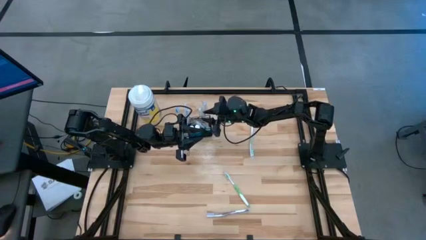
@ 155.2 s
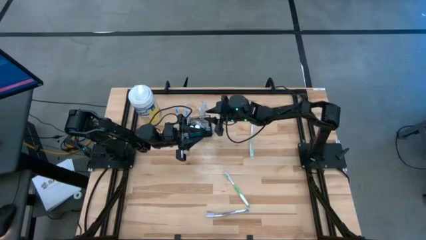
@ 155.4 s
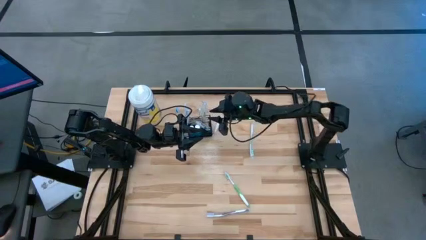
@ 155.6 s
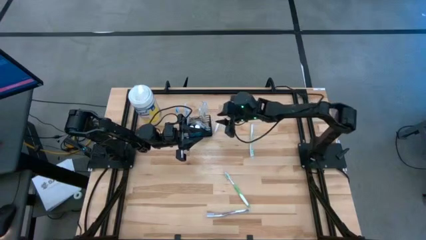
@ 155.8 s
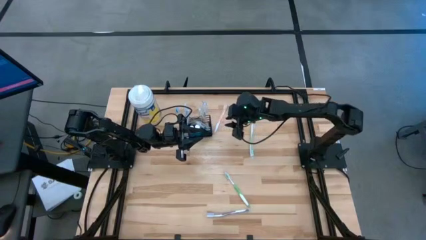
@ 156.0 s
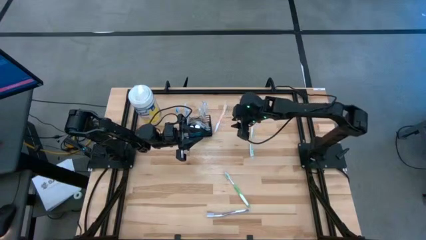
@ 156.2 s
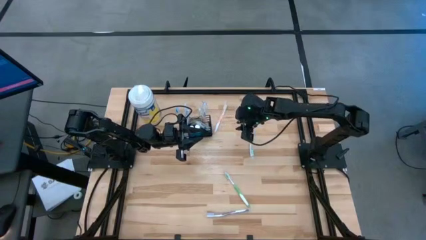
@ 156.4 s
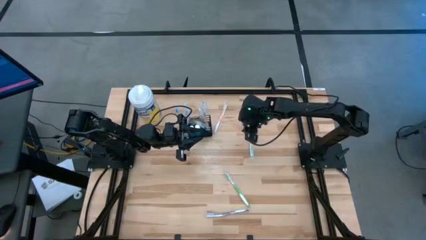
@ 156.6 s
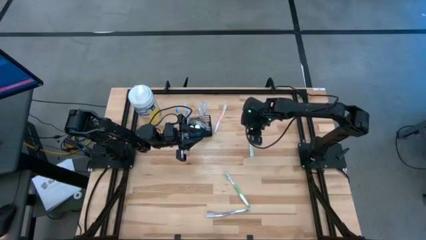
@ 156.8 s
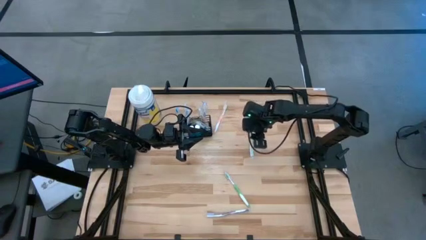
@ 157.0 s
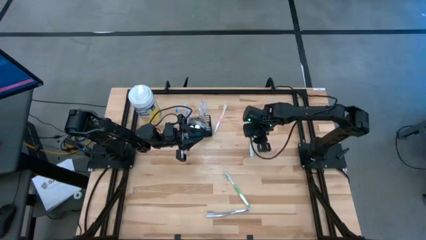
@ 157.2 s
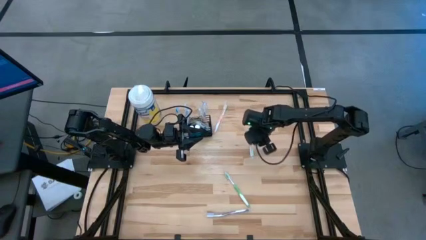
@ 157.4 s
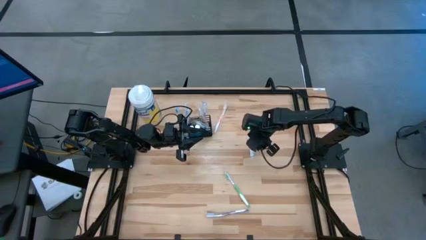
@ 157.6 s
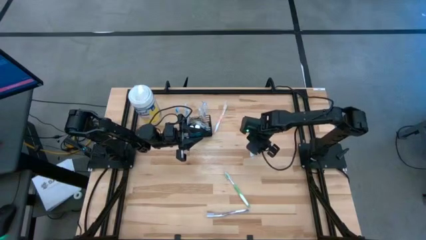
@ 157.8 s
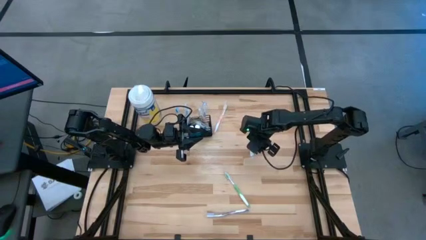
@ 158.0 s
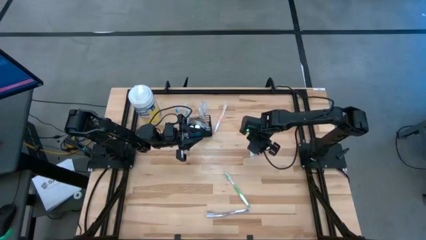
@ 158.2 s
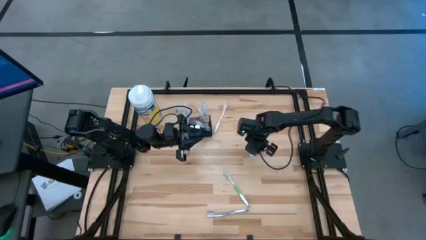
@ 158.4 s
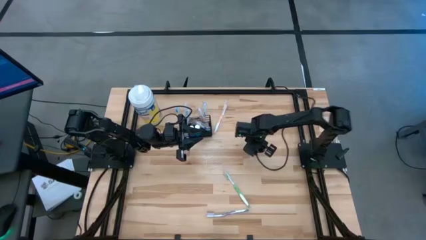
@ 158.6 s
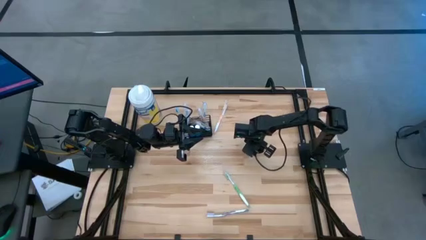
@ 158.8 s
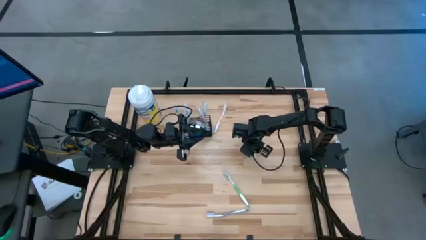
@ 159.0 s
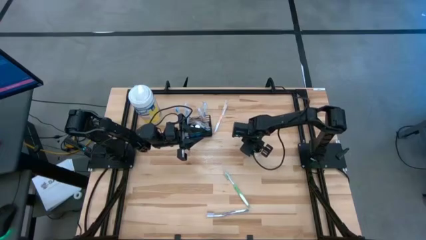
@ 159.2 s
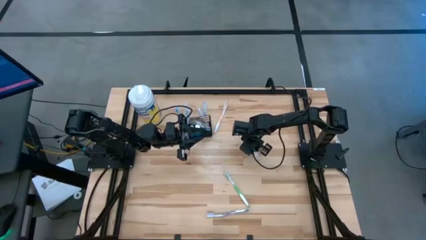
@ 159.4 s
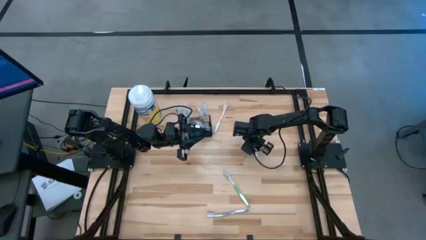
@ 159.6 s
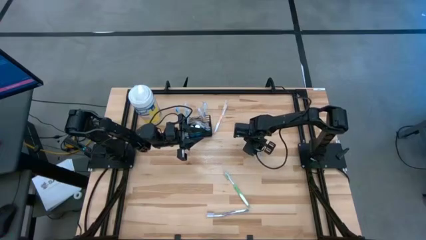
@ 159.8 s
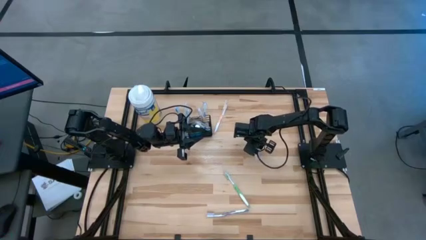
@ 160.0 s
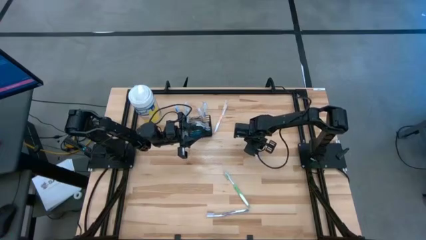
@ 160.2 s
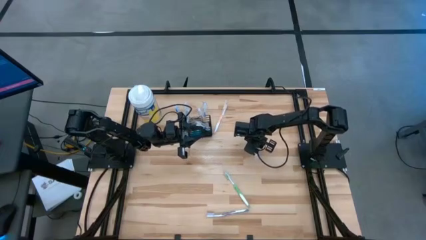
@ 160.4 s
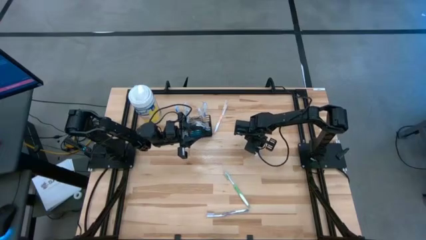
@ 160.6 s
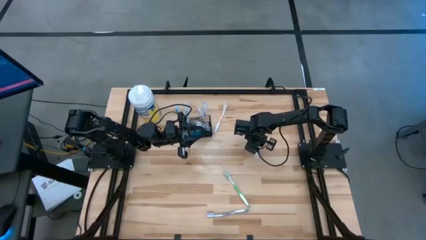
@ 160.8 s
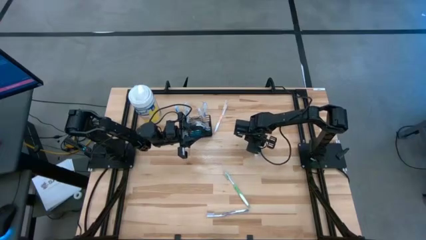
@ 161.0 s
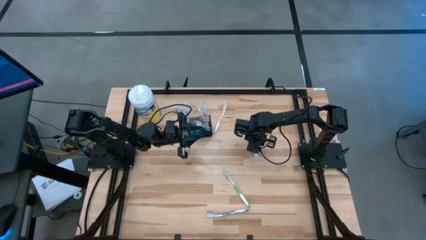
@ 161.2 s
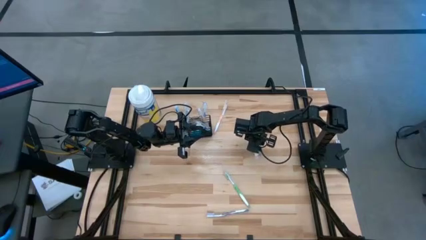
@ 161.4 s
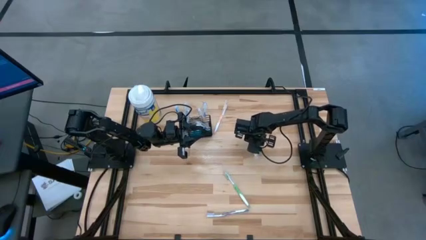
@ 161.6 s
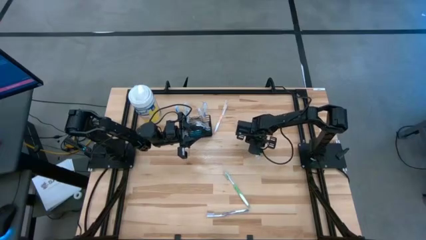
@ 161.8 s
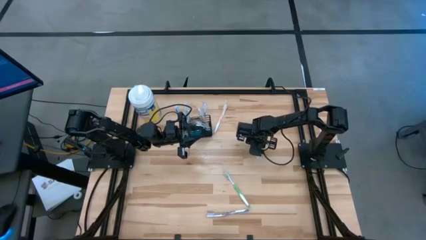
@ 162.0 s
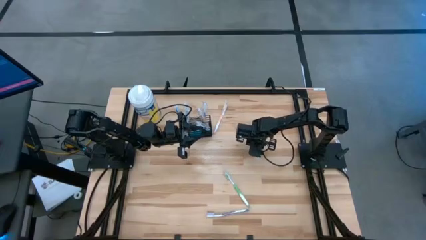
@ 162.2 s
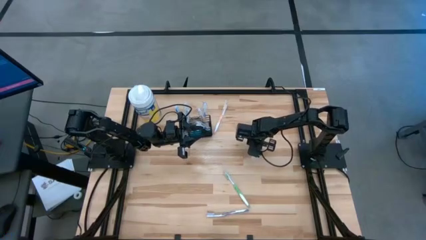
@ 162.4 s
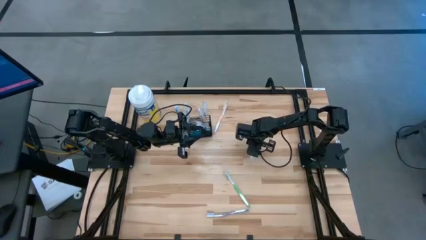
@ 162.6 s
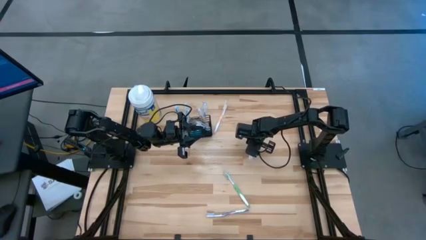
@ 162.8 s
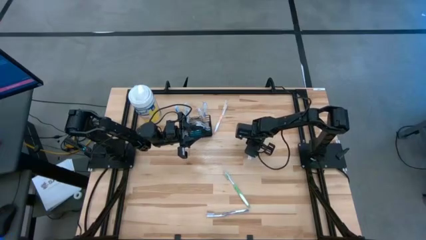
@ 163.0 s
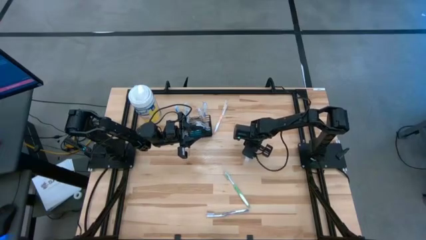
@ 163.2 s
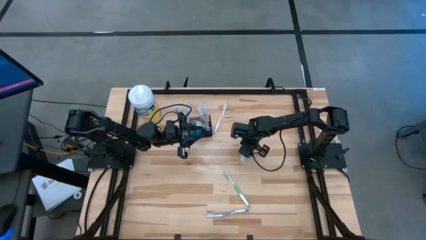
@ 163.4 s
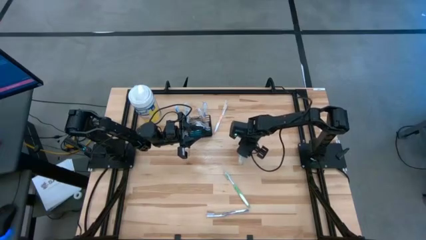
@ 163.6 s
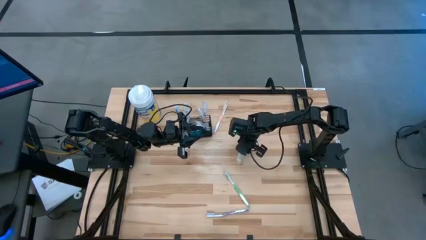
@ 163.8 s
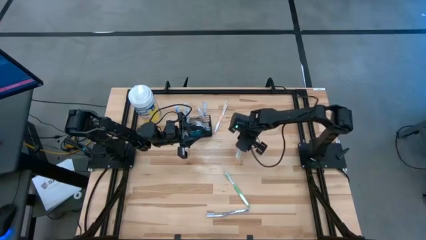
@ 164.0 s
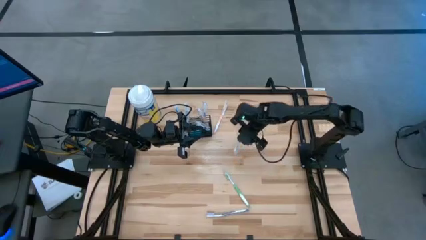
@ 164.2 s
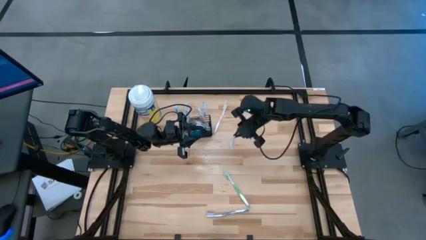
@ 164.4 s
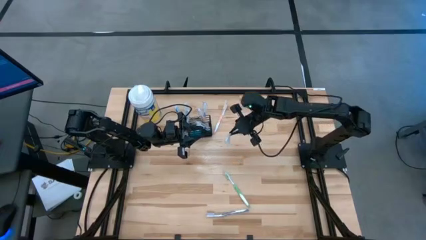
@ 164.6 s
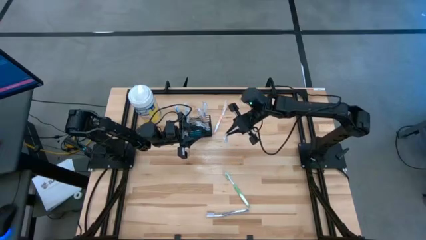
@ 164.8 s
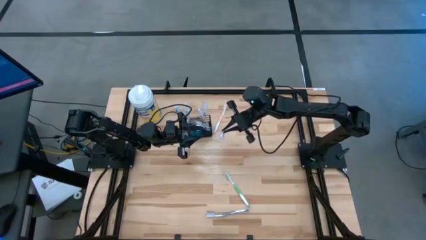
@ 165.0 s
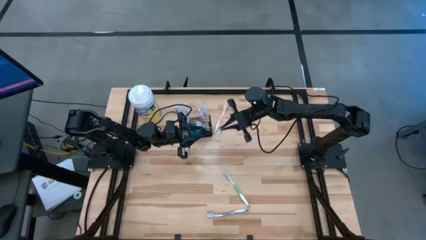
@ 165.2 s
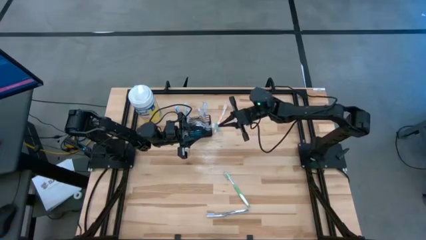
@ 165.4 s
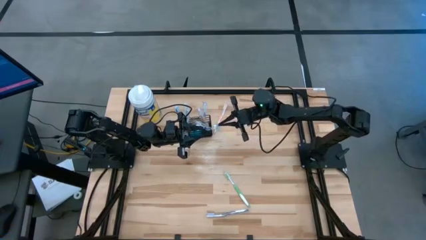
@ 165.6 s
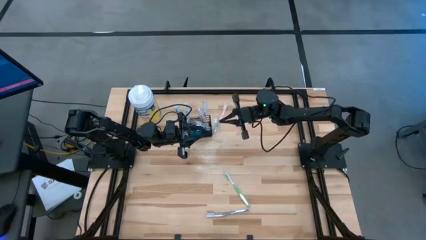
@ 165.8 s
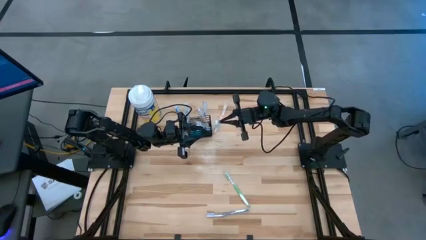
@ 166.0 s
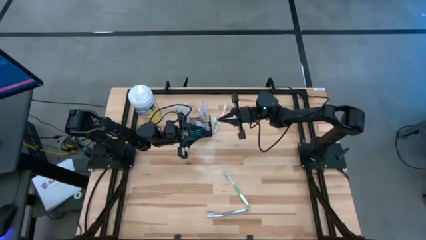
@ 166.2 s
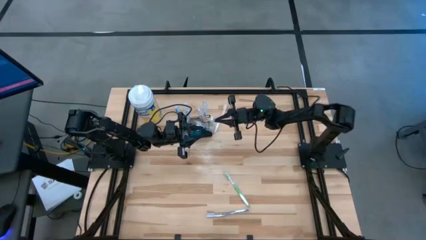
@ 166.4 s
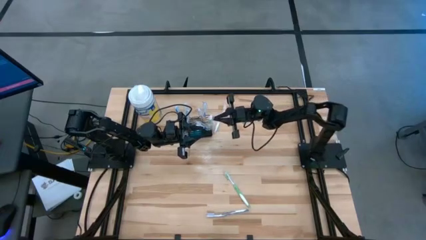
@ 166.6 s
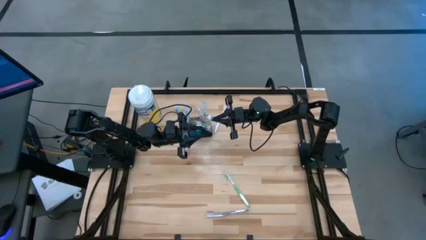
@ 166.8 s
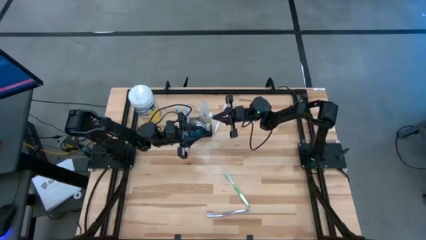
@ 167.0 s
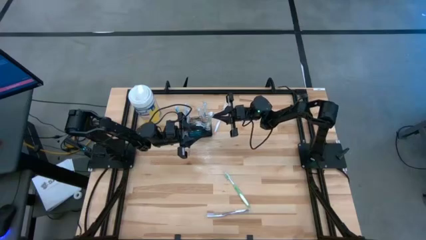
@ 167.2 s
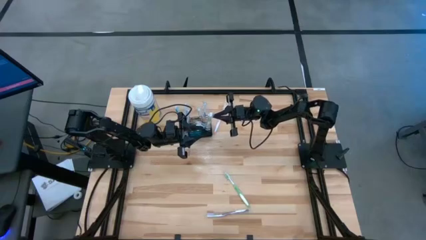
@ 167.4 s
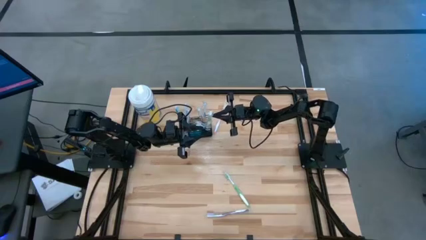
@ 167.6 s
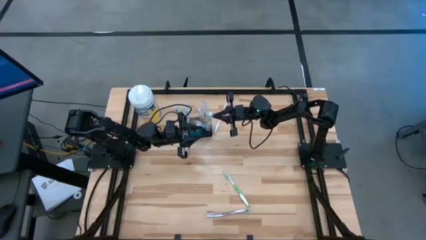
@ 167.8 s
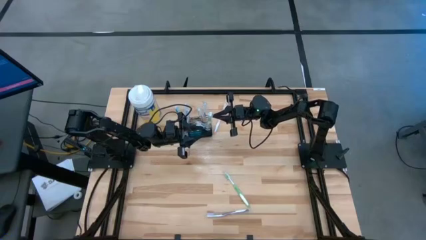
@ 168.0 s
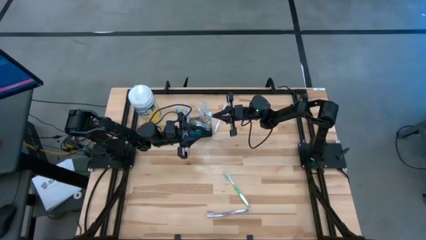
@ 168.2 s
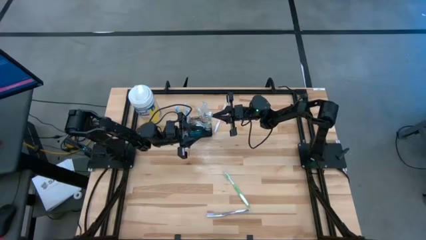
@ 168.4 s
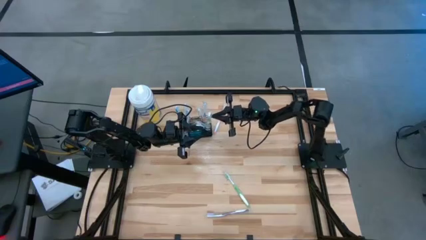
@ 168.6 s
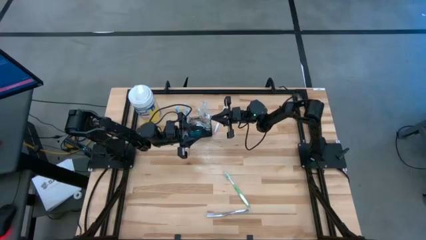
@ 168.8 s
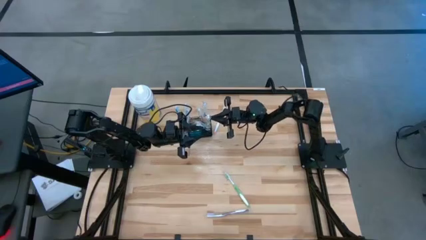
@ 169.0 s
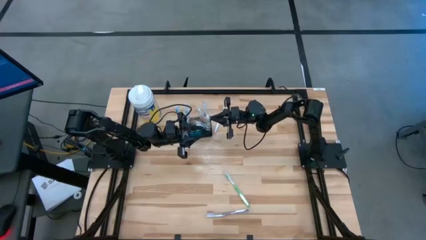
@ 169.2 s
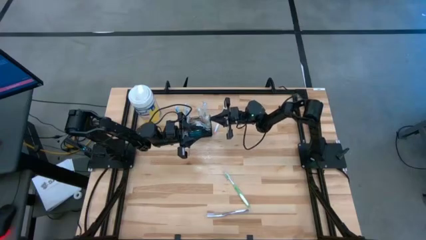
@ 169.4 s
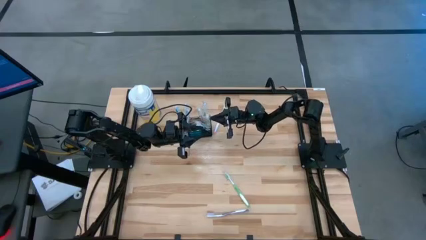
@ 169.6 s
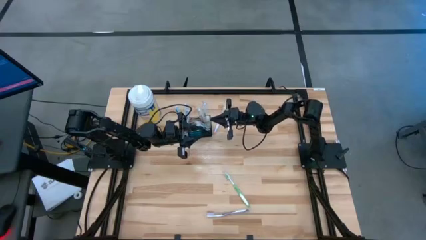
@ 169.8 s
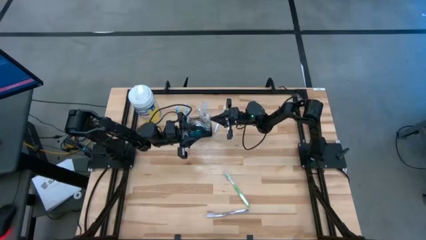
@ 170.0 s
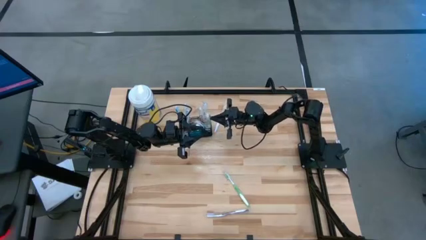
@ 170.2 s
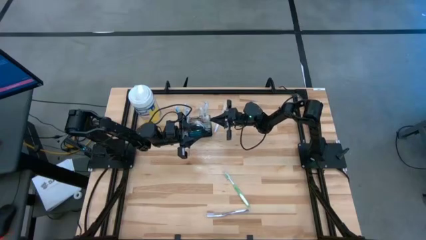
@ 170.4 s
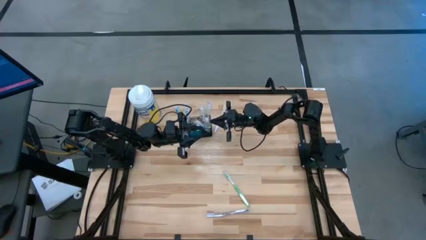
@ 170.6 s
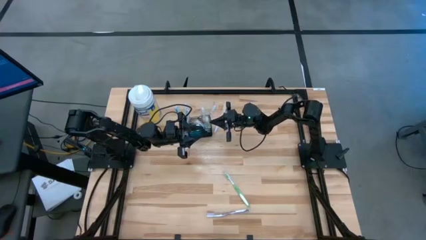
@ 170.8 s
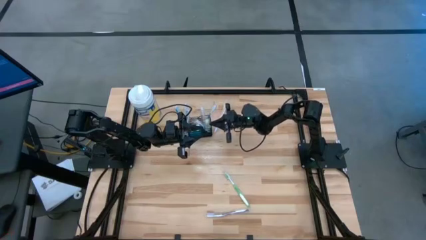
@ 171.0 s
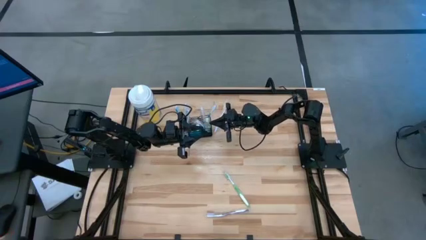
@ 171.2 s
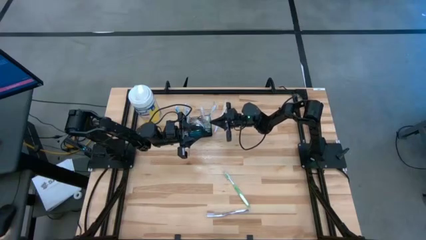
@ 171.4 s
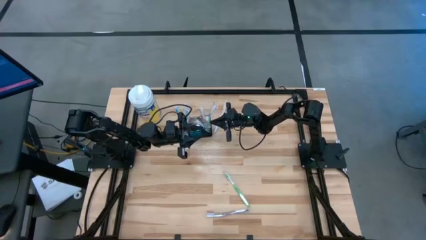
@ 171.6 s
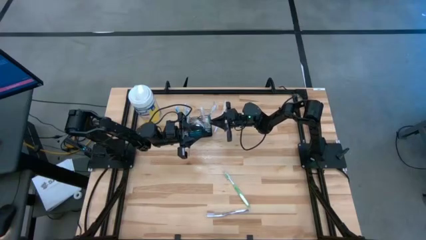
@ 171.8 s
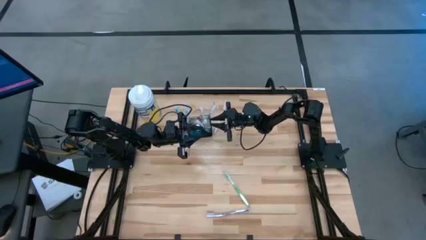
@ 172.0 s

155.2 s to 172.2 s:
Task: Pick & Place toothbrushing station
Put the top green toothbrush into the mesh organizer
